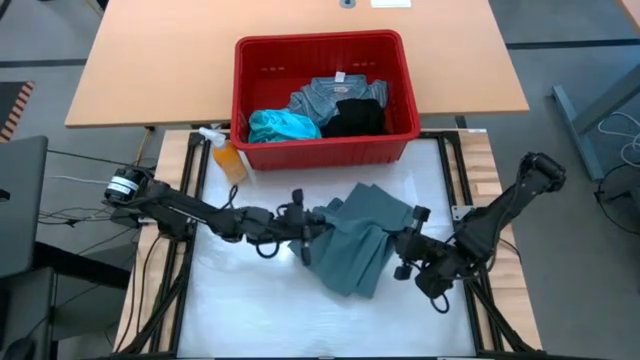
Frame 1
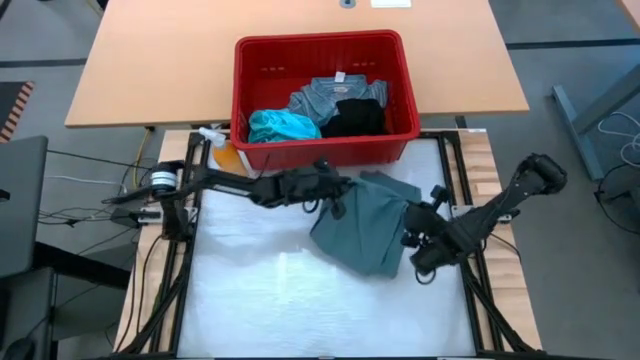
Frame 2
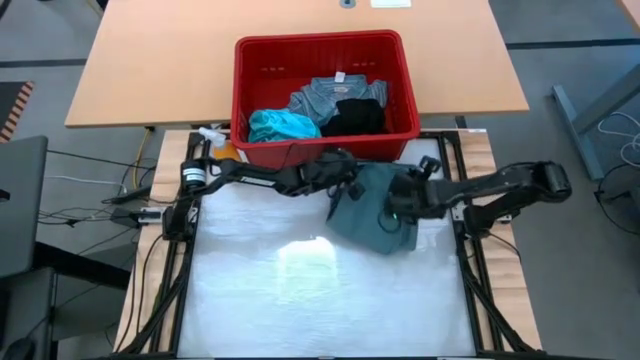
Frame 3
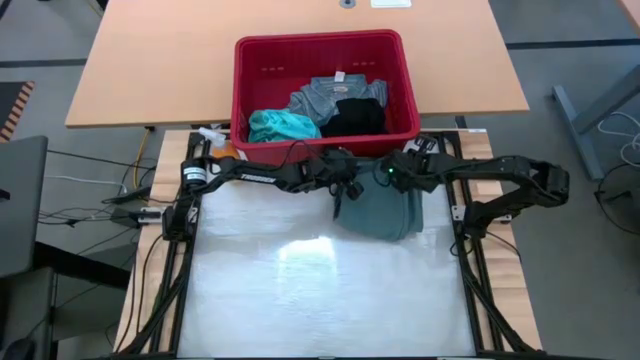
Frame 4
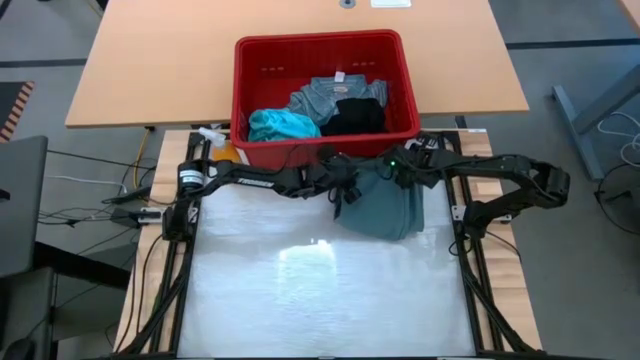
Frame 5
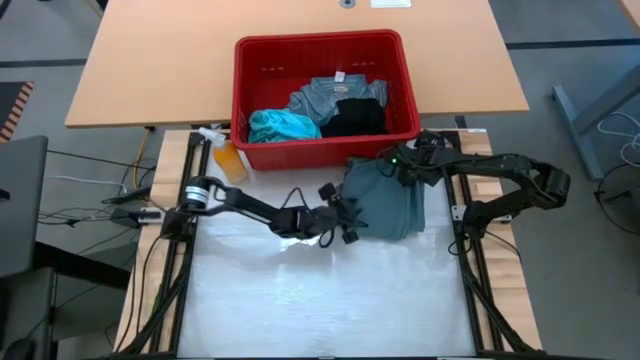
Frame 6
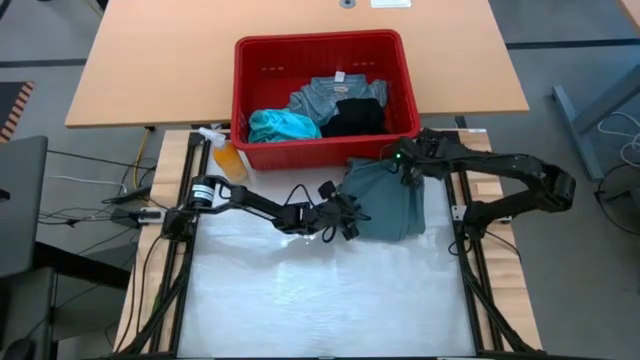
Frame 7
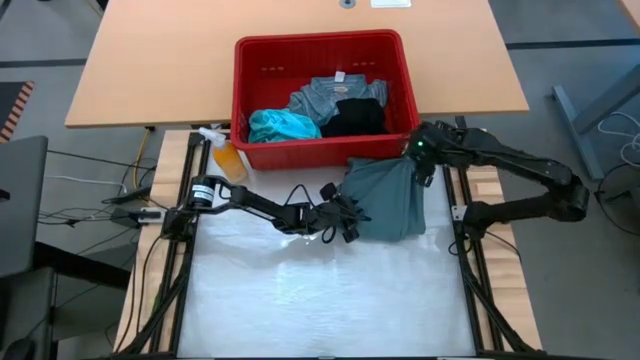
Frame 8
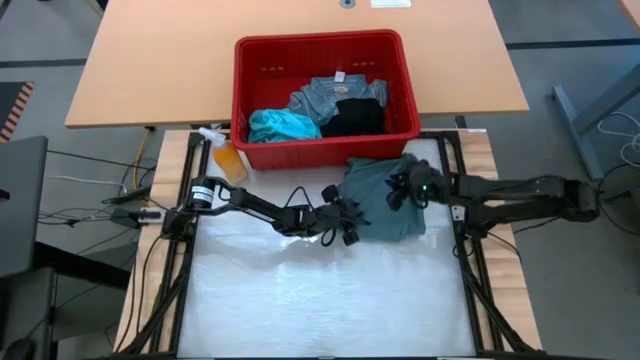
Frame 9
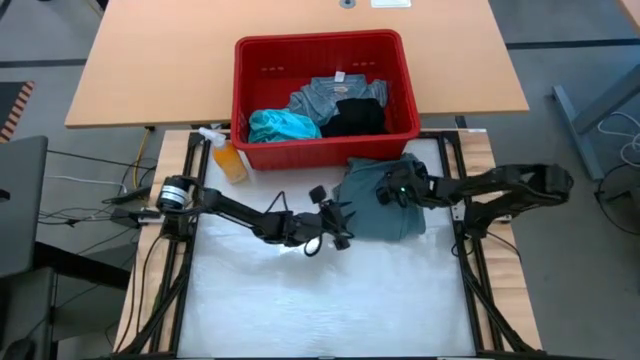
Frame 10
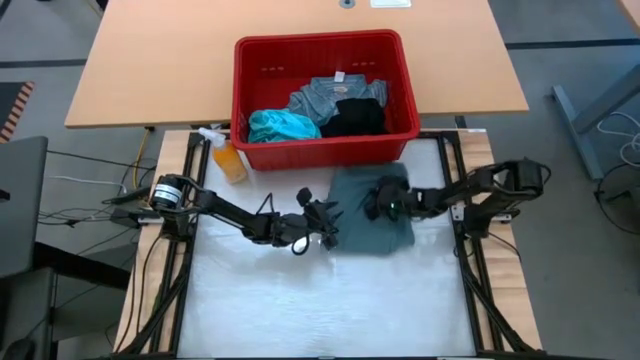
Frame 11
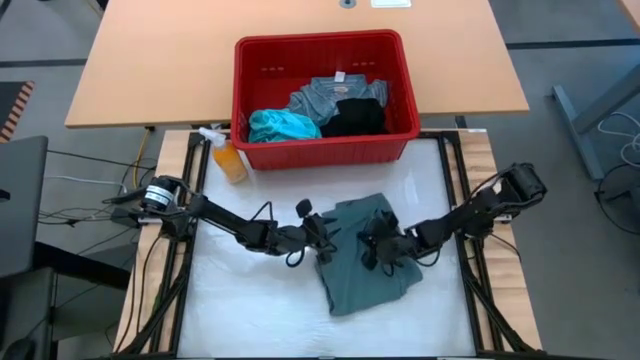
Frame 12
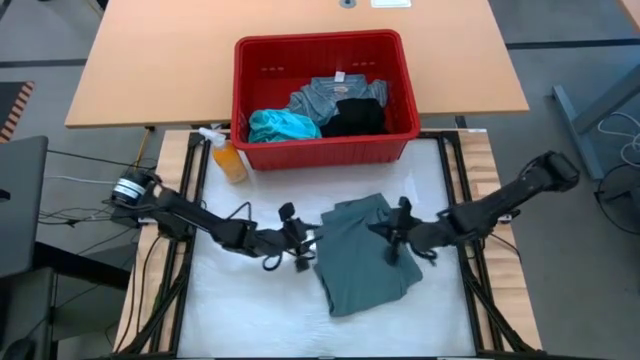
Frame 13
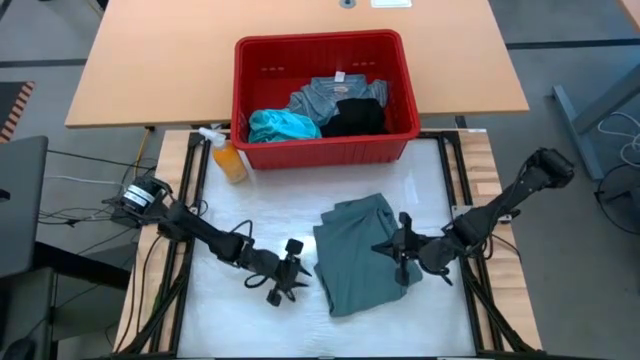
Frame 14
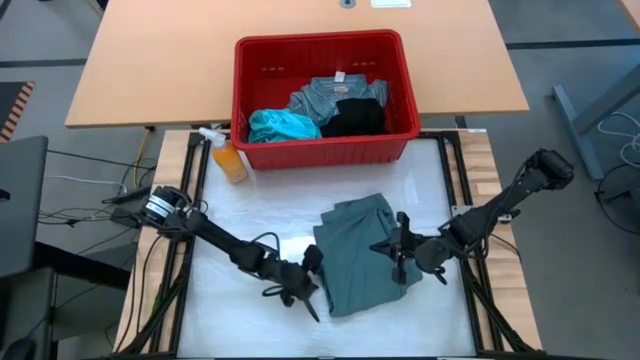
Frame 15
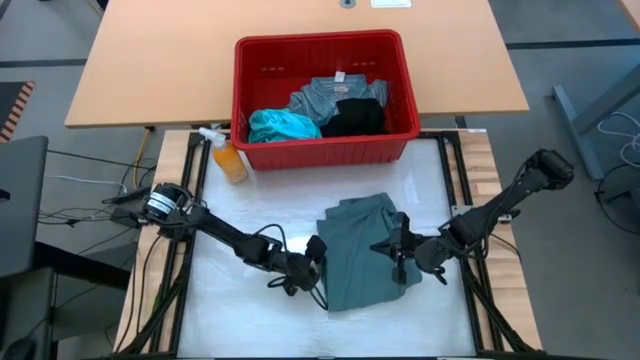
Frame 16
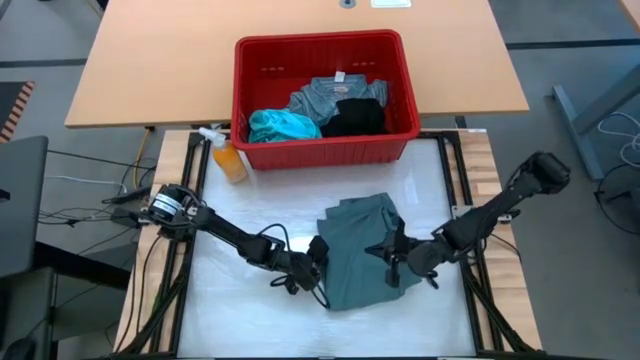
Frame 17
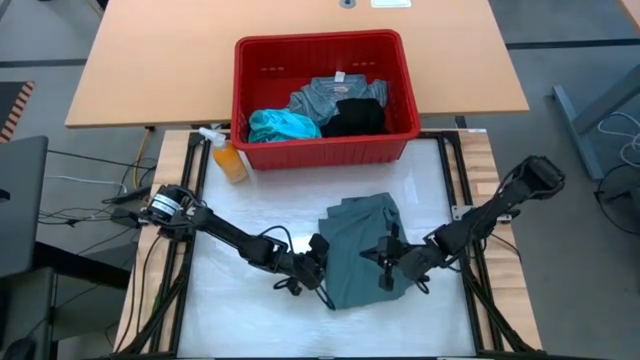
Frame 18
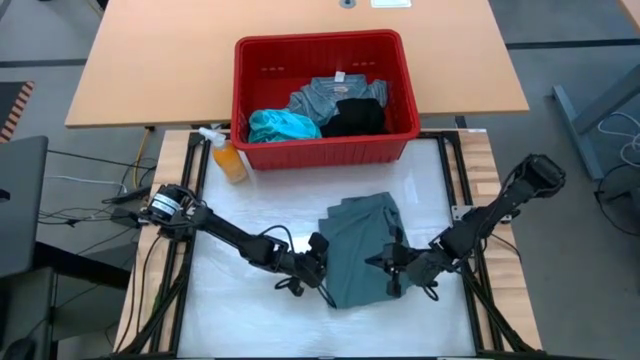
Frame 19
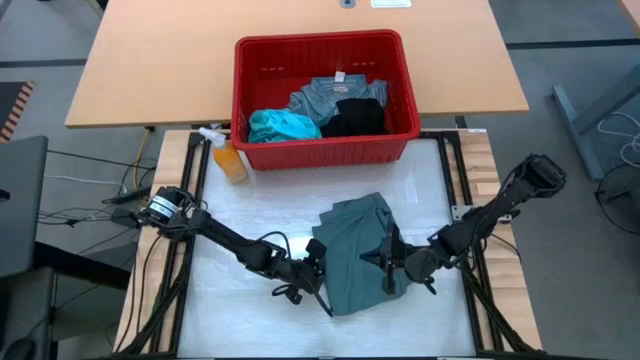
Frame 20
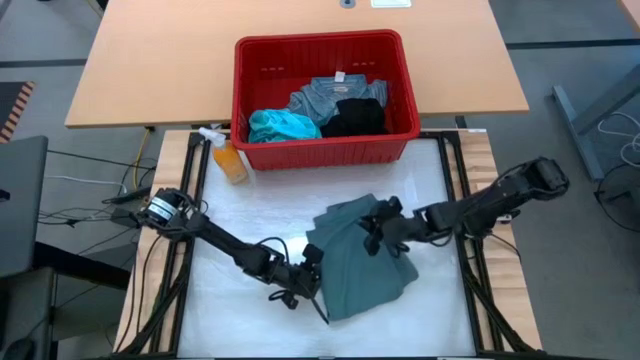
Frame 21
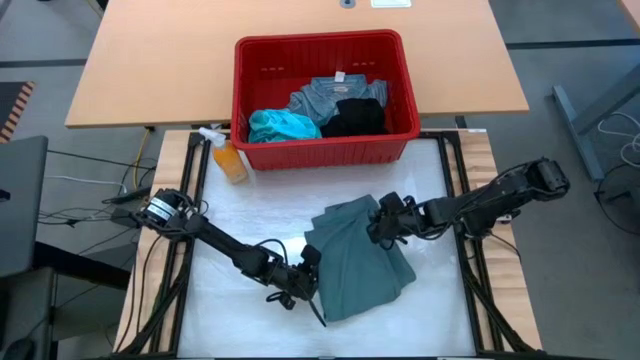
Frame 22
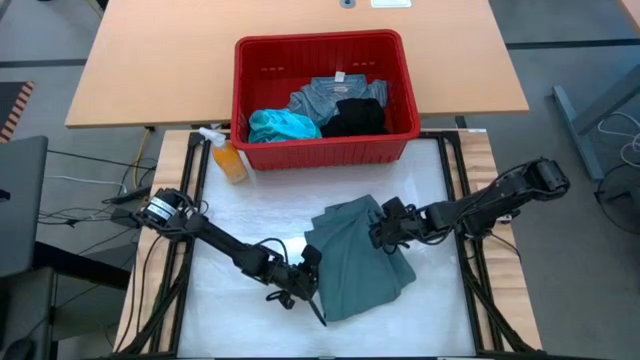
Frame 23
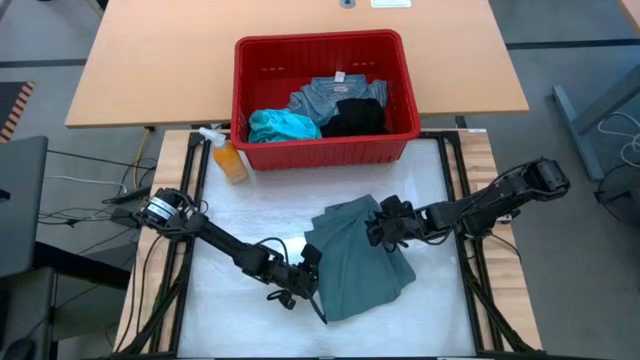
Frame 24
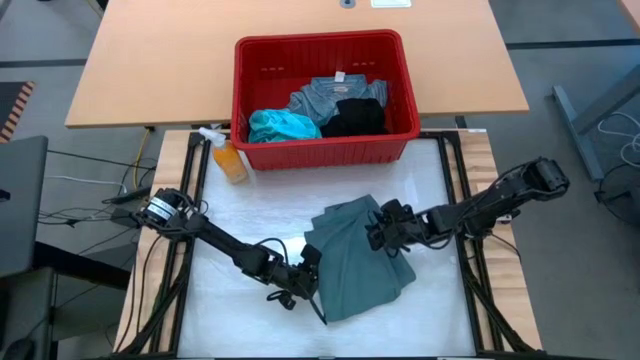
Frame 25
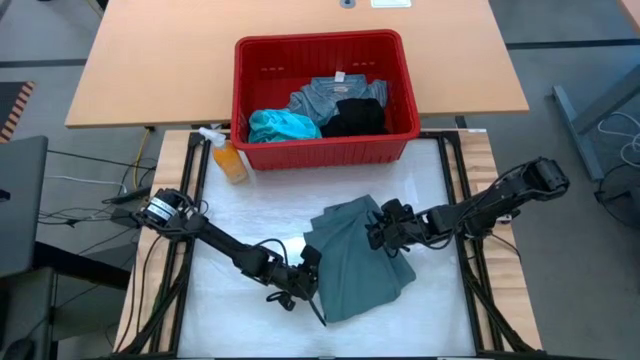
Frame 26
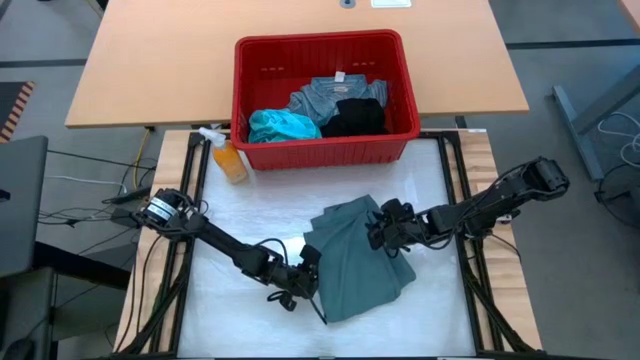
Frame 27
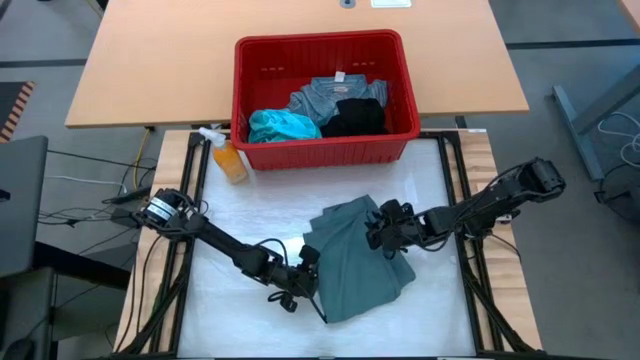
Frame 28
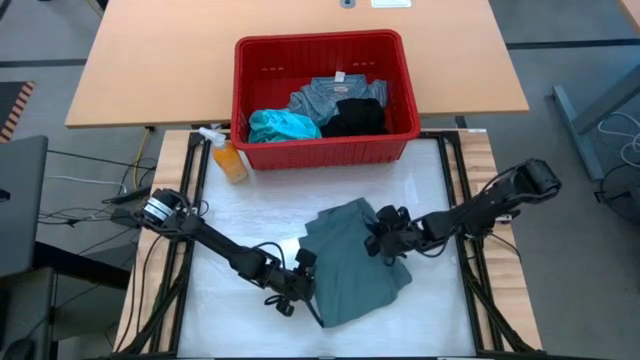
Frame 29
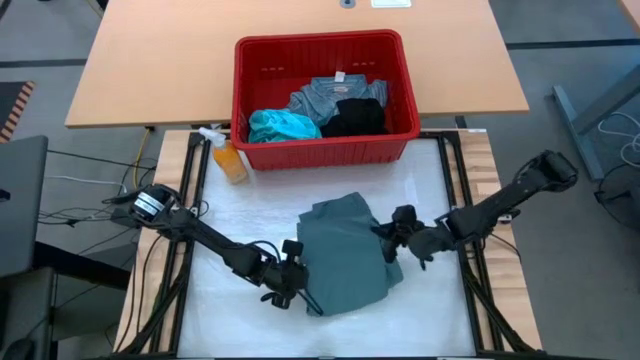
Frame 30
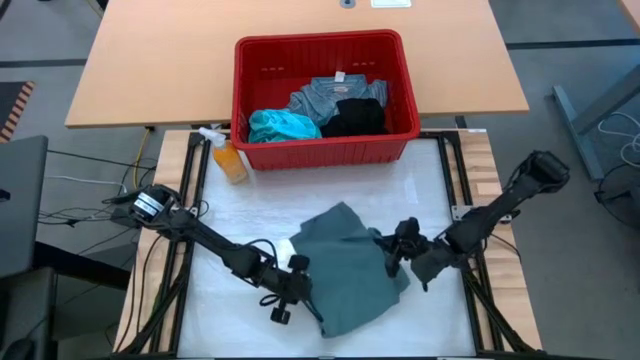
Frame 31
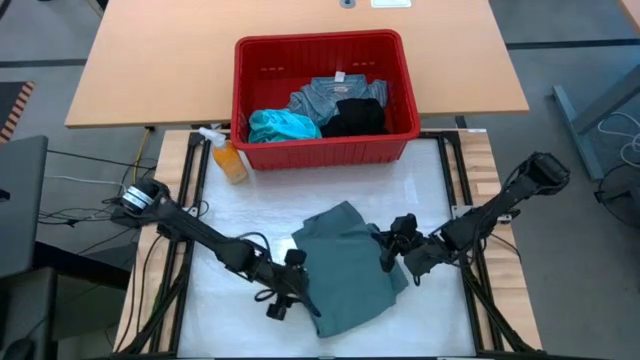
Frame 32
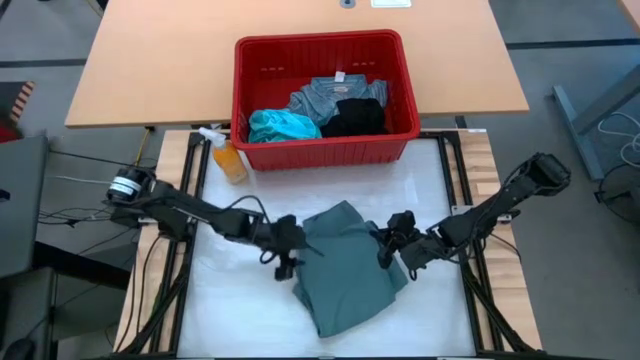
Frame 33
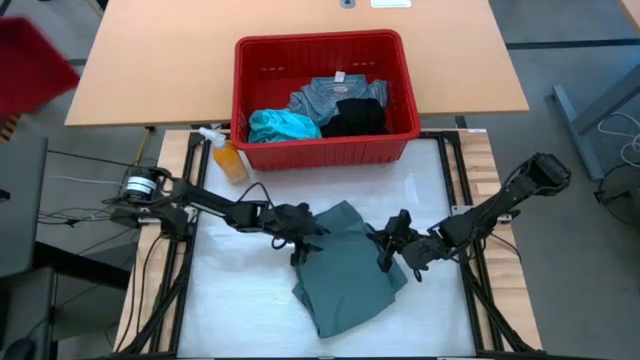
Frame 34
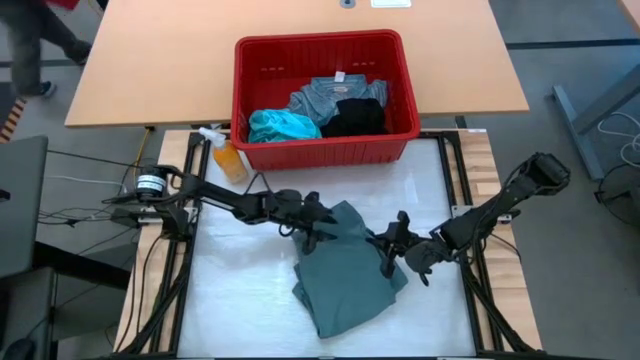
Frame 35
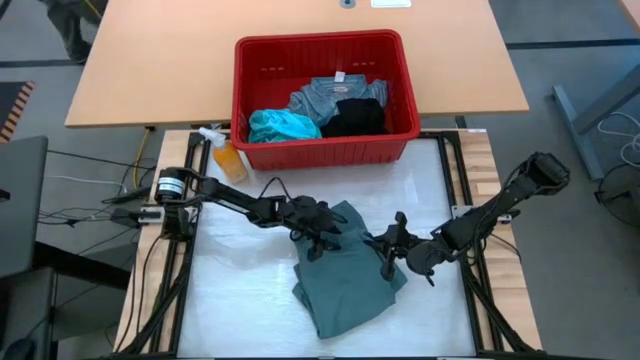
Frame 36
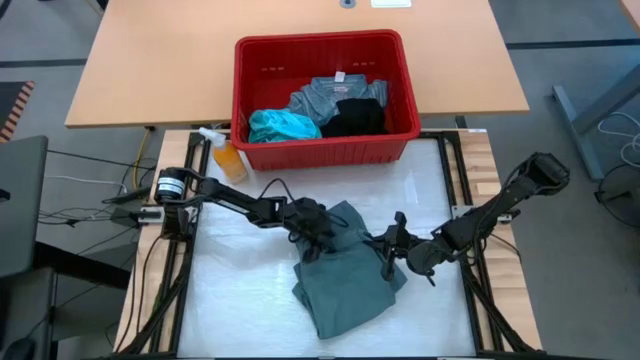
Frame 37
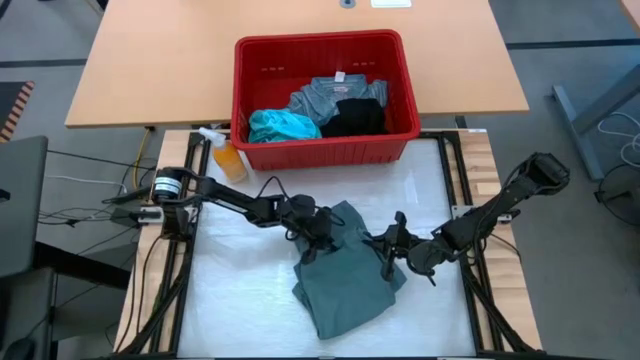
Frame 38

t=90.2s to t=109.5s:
Task: Fold Laundry from Bin
Fold the gray pants

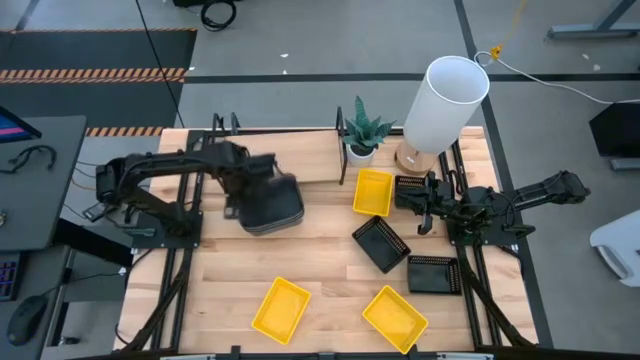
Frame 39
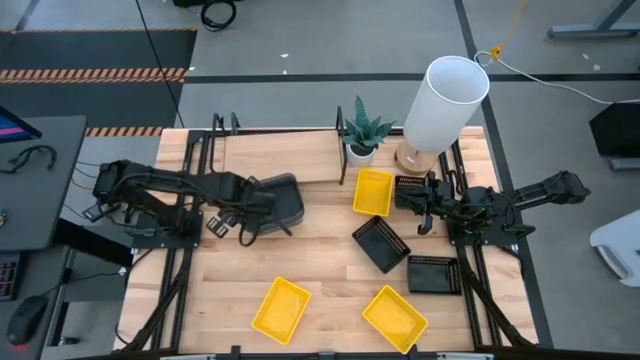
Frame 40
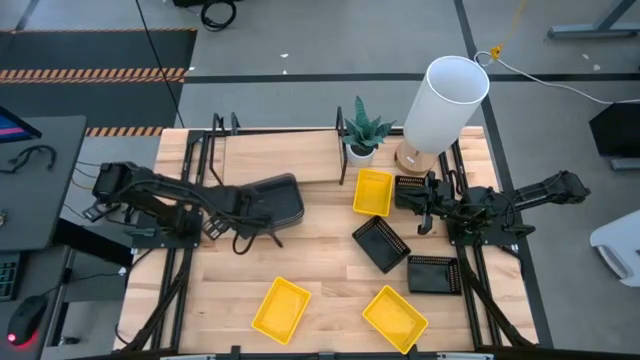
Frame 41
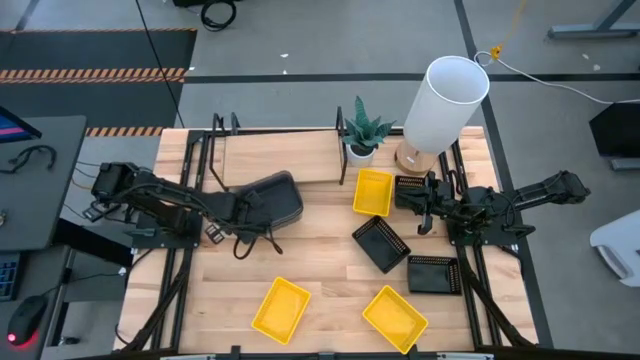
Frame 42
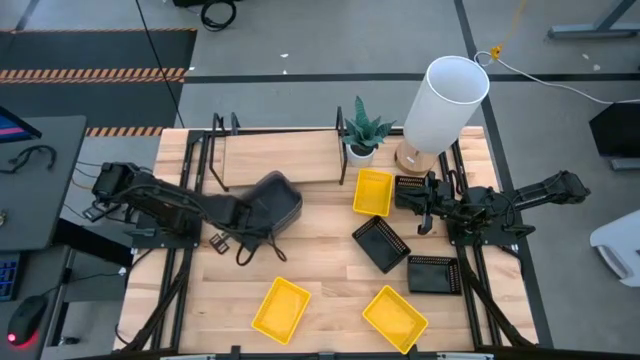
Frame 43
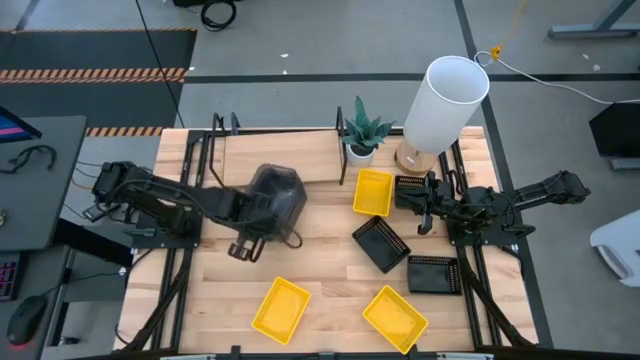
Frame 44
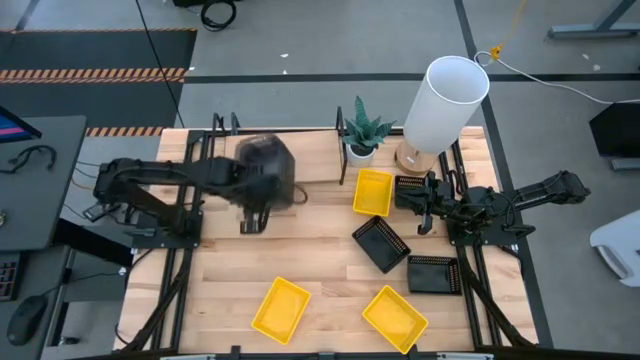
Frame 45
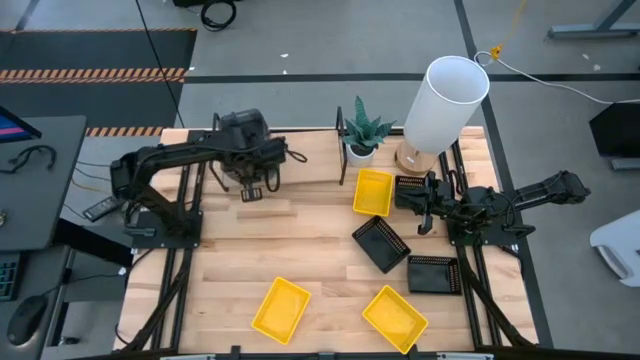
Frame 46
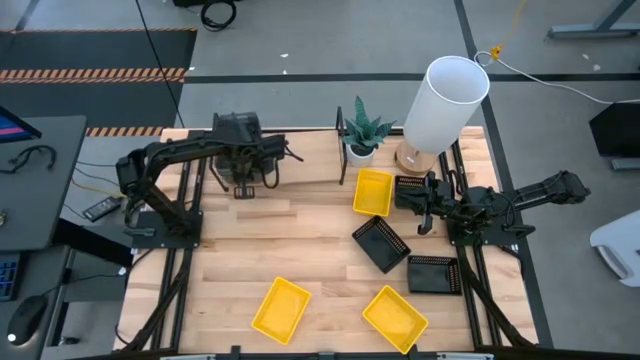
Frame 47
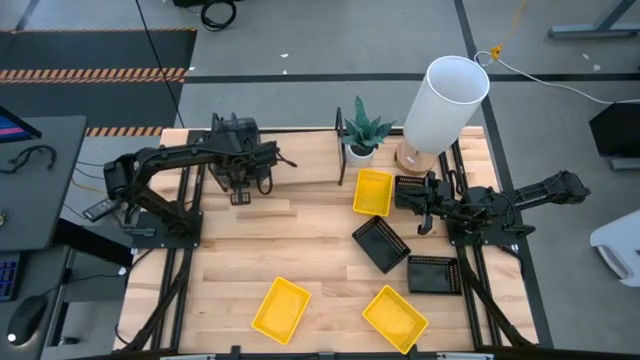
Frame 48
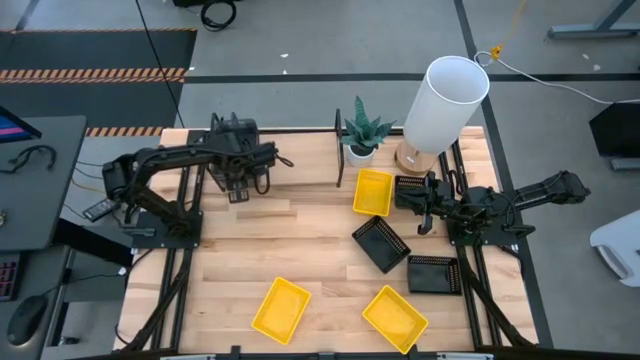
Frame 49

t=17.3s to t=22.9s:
Task: Stack baskets on shelf by color
Put the stacked gray bins on the shelf
